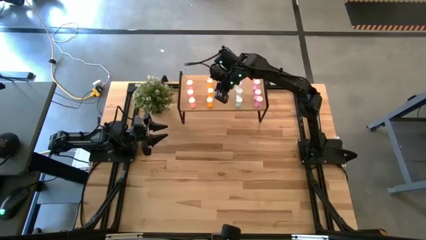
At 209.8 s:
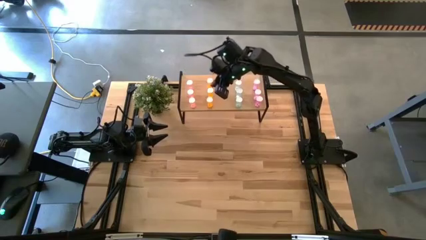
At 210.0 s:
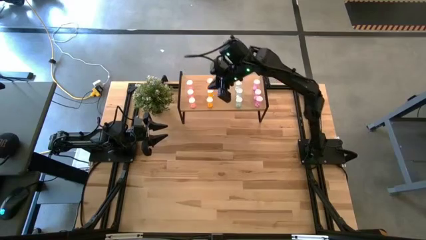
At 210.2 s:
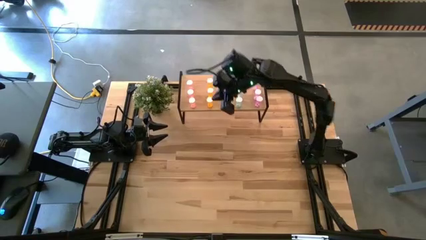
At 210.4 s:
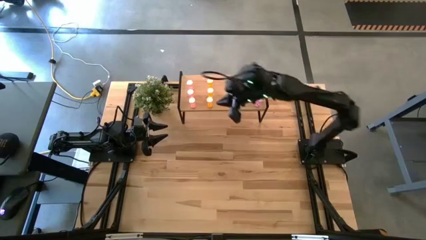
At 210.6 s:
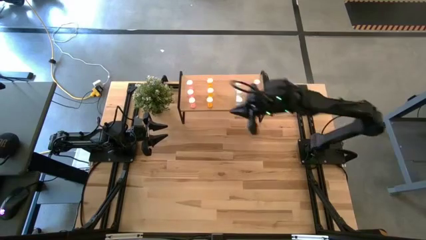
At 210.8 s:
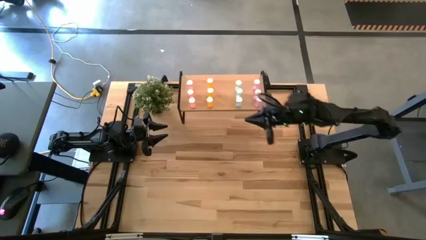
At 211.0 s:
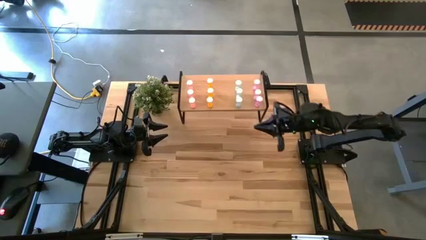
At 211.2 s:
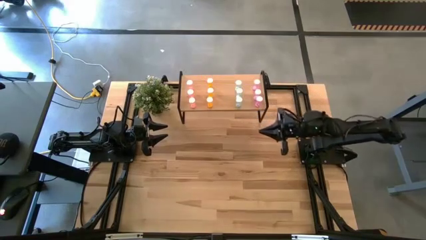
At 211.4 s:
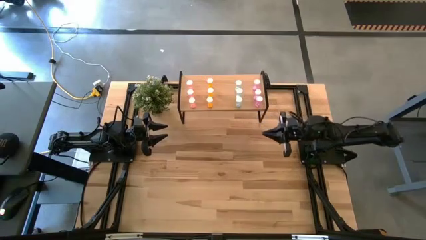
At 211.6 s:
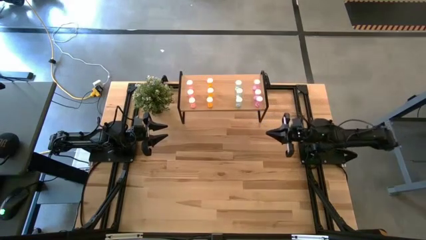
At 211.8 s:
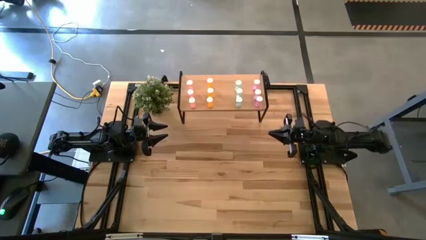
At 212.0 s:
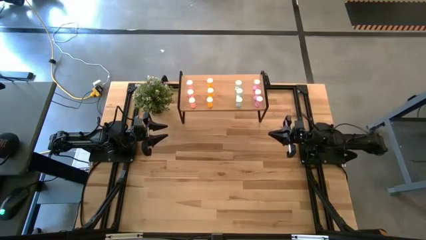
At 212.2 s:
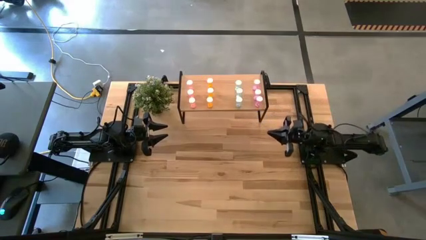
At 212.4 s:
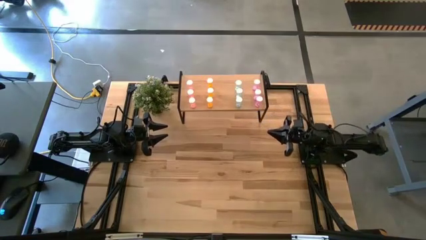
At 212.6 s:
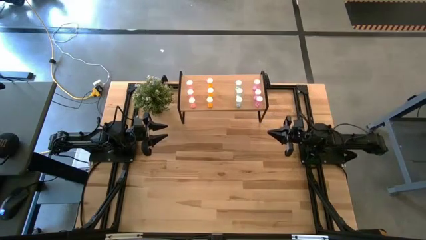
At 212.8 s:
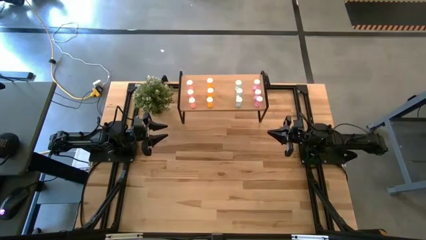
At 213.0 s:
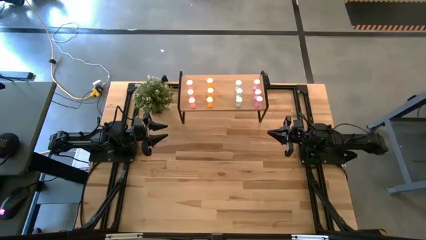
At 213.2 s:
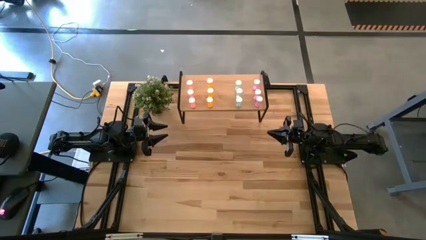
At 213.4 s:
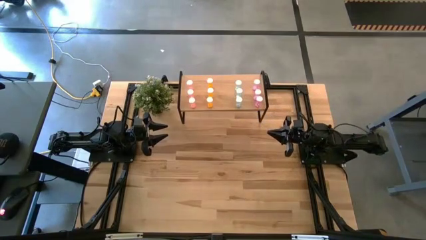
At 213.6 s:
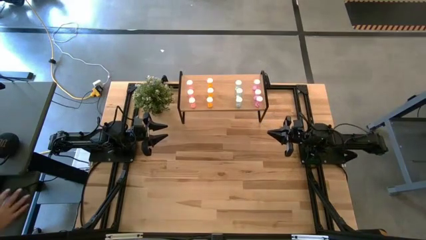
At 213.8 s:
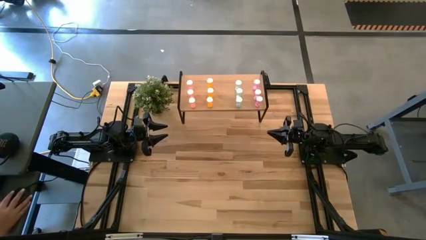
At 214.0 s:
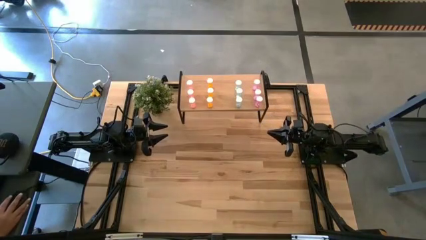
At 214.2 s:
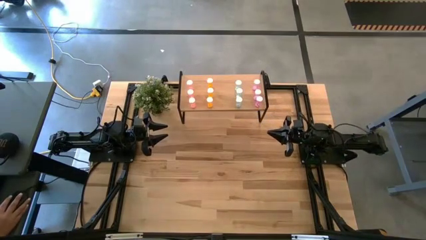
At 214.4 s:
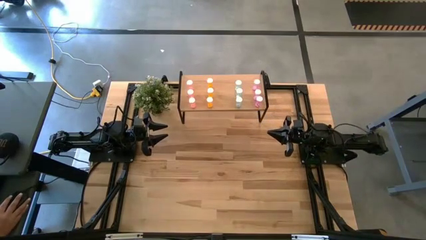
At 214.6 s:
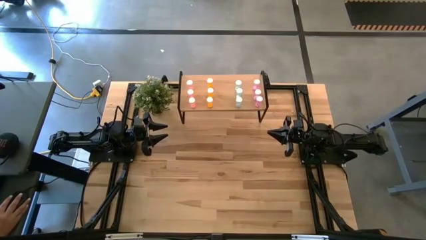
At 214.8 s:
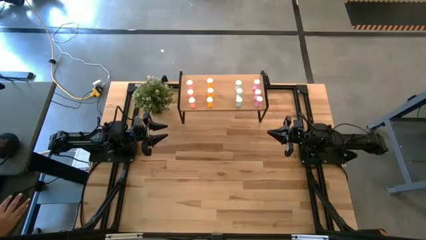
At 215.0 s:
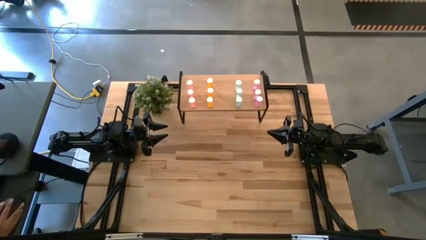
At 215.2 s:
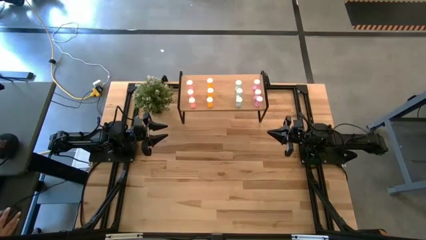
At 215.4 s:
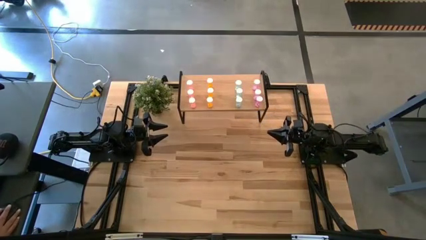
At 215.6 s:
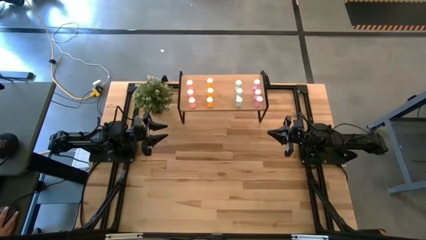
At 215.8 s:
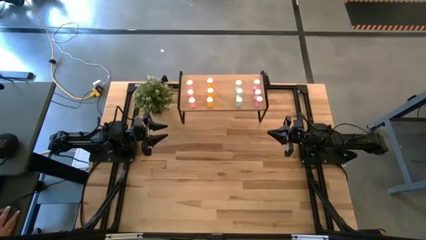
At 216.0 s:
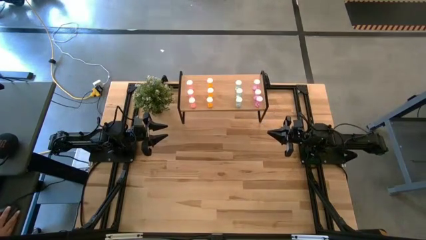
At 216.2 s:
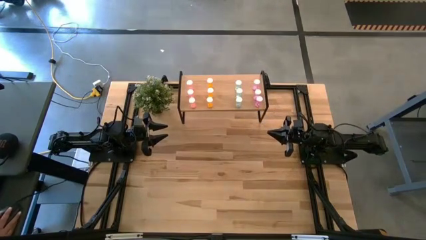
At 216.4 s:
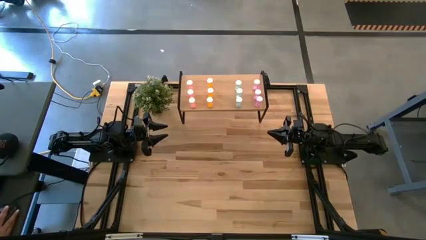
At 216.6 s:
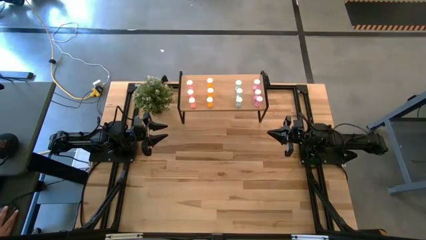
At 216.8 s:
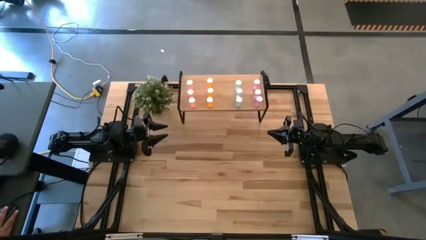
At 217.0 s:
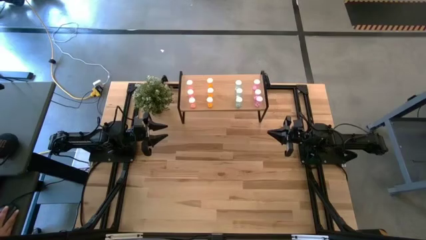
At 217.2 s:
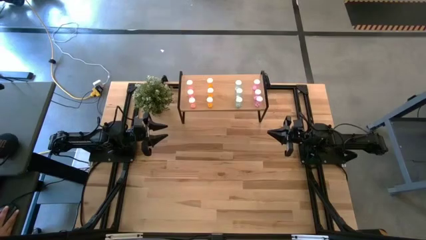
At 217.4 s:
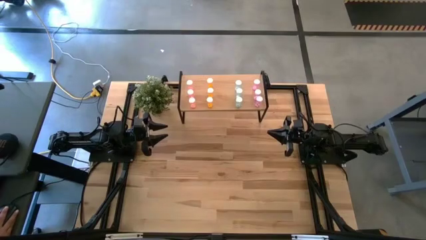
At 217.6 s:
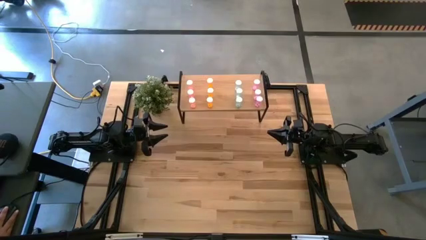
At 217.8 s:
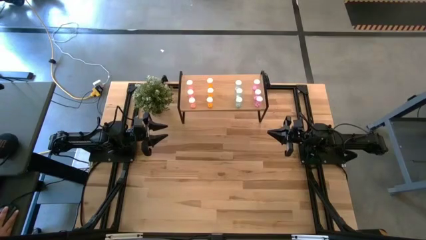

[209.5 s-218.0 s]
Task: Pick and place medicine bottles onto shelf by color
Return to home position

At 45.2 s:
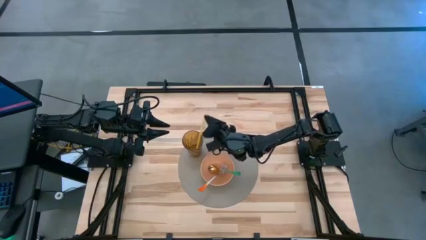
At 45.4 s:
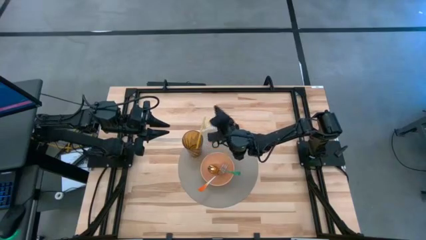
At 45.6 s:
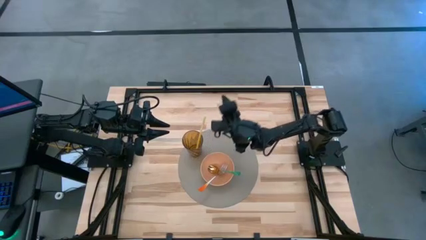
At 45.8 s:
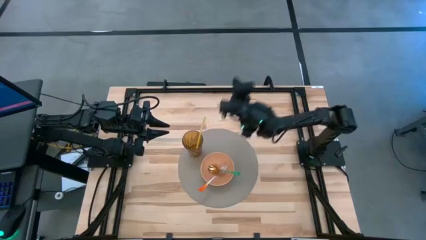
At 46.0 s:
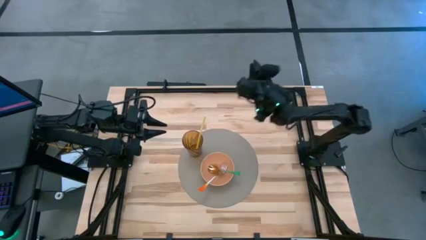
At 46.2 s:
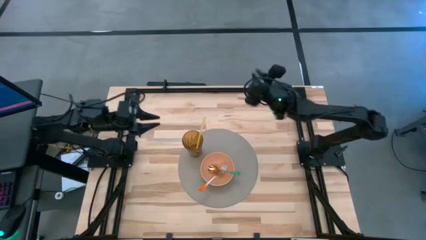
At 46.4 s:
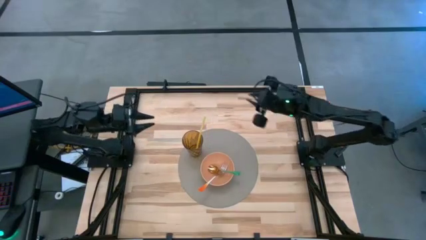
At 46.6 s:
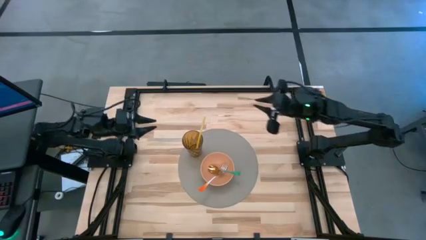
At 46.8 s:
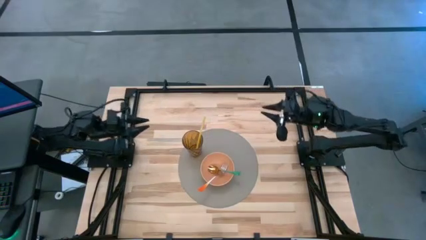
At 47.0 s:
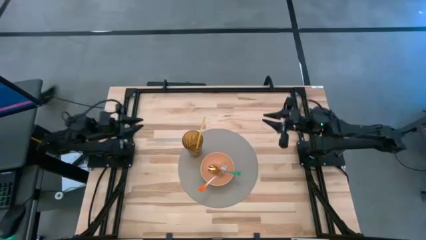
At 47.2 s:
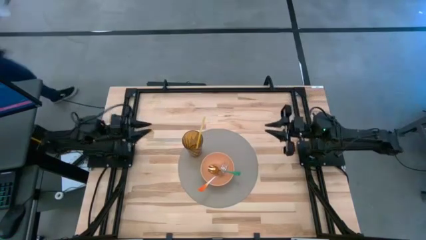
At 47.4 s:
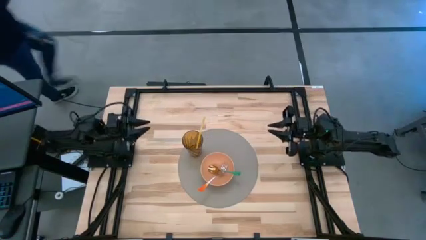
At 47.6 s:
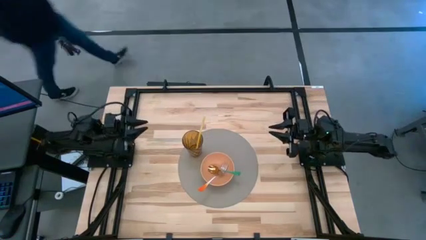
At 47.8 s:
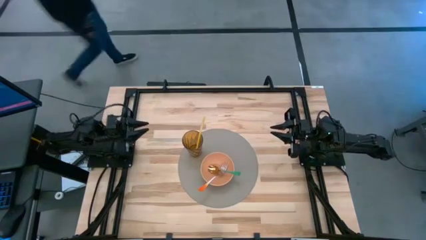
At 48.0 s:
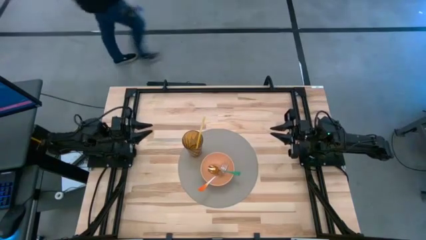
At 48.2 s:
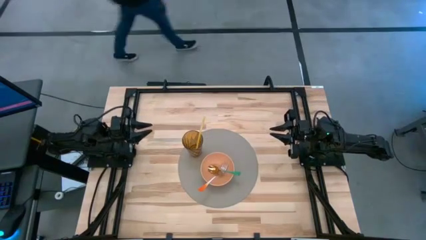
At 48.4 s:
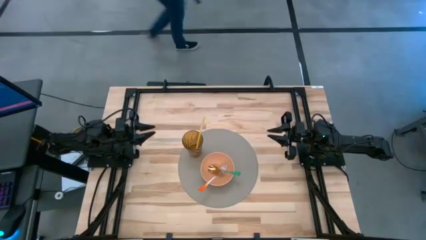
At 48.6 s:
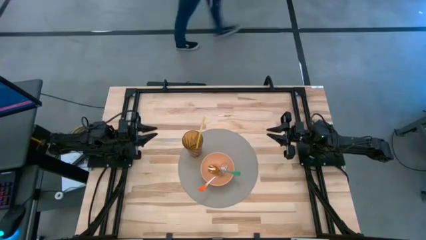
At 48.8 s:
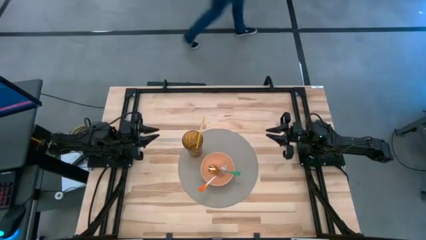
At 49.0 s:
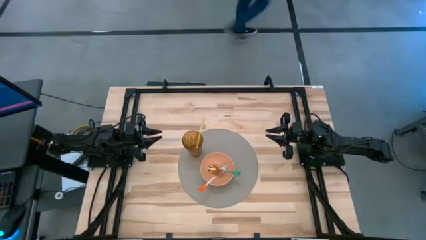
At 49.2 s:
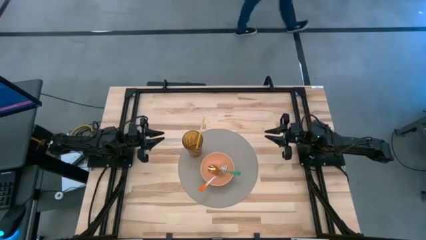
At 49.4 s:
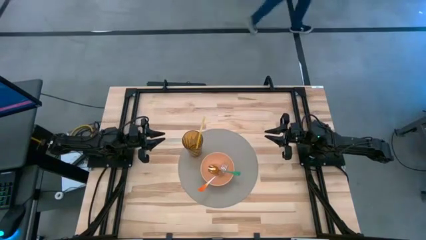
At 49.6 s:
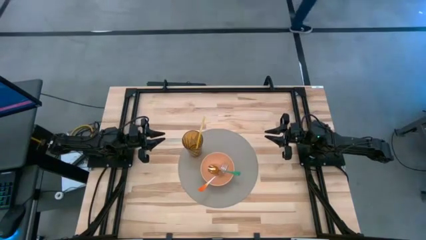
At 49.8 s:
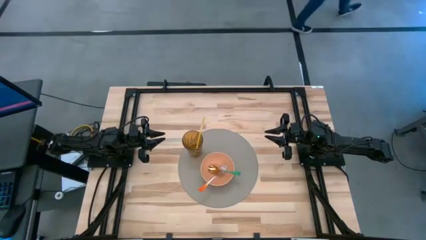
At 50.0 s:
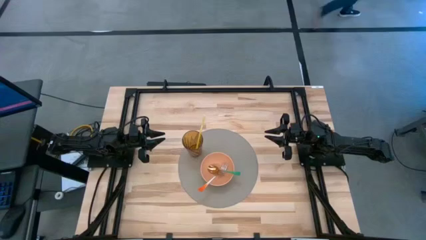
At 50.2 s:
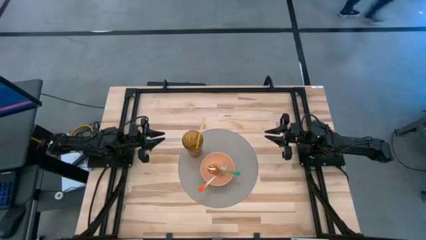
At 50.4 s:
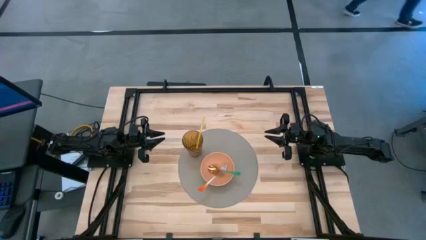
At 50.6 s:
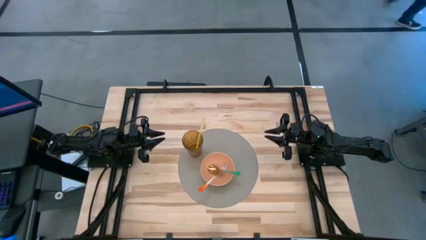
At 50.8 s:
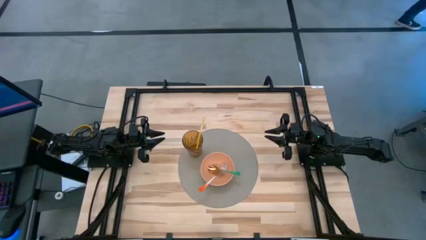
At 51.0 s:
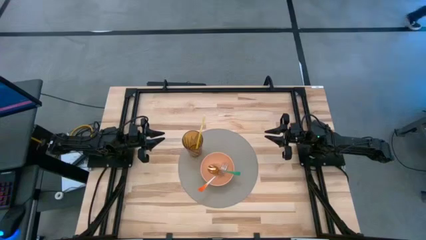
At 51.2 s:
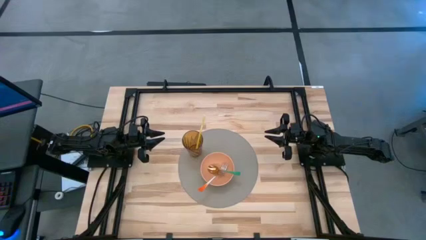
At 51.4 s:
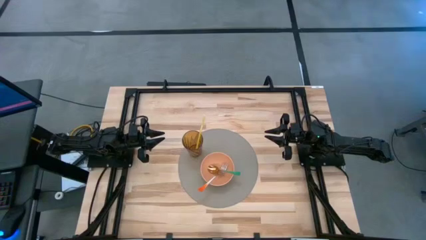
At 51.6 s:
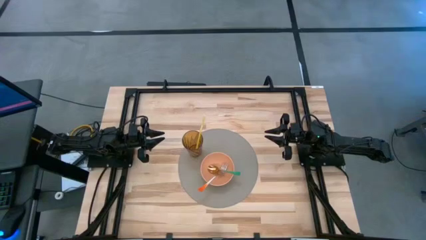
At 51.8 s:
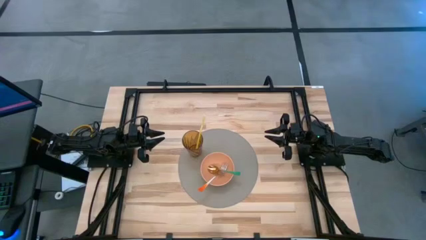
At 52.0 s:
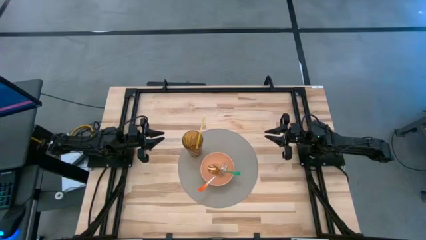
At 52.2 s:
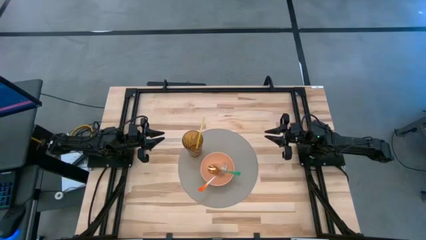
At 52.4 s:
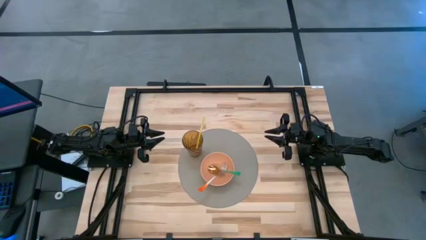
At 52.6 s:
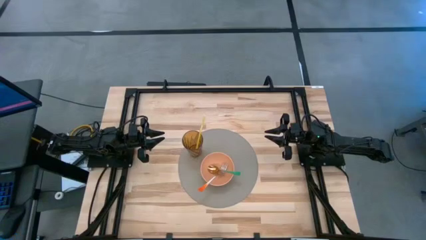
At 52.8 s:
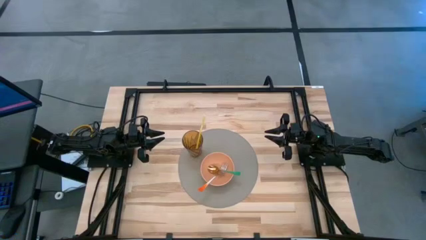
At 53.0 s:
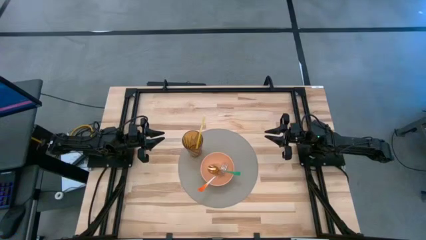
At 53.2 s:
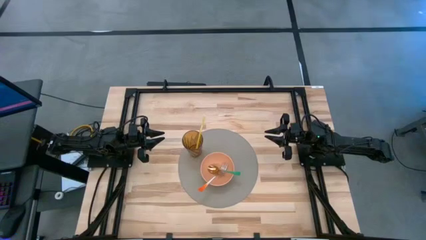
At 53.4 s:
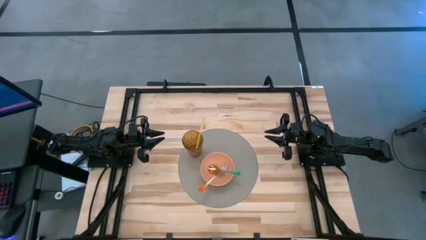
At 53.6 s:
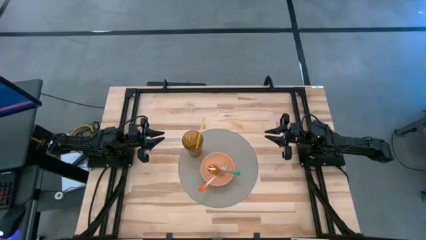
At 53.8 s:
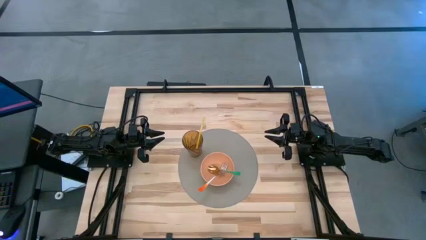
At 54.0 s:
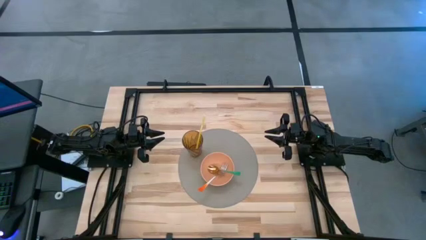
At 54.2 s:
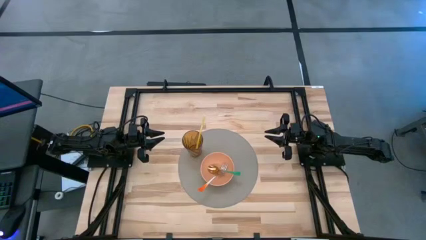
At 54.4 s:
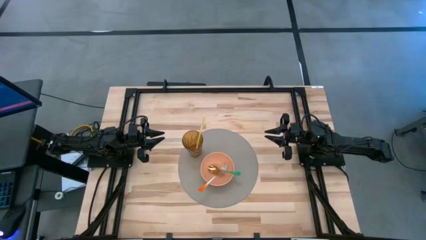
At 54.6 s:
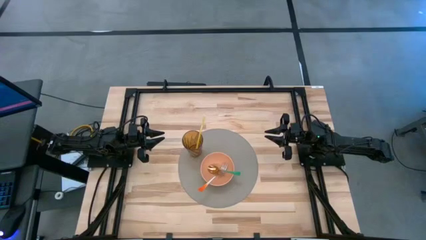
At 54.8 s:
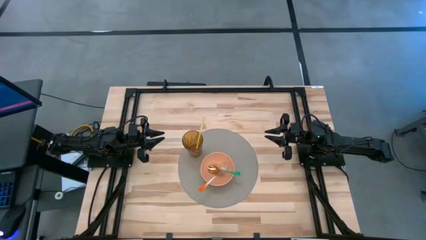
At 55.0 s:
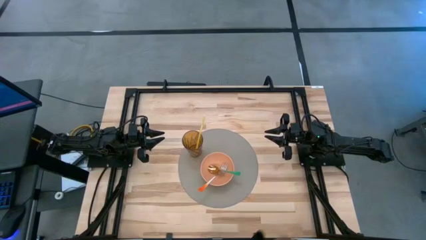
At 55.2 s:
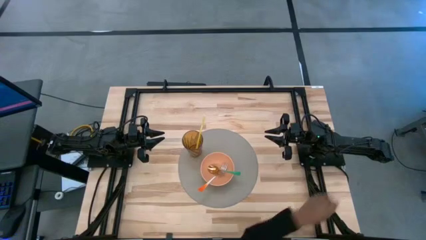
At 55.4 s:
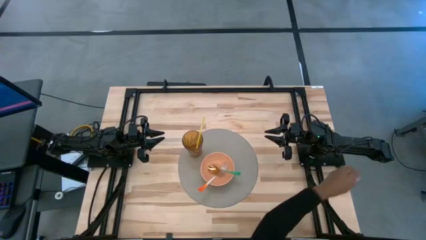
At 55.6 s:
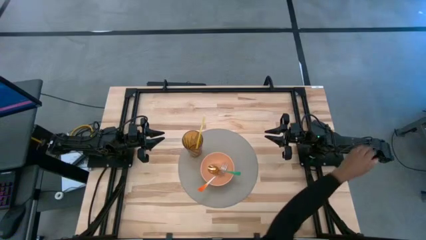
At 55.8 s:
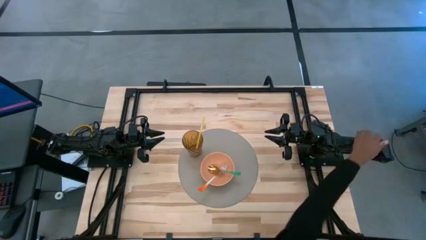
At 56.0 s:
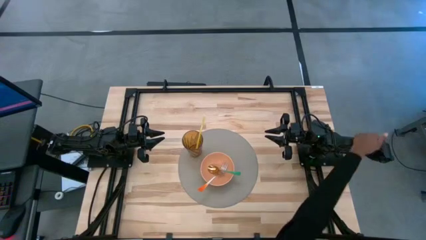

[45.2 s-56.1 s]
Task: Pick & Place Utensil
Return to Home Position
